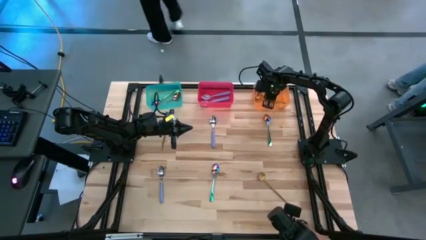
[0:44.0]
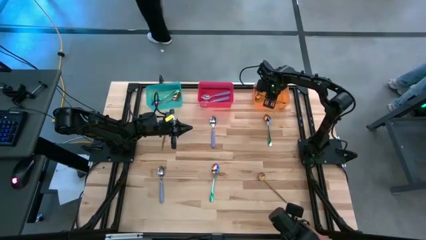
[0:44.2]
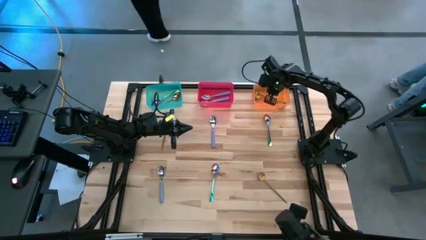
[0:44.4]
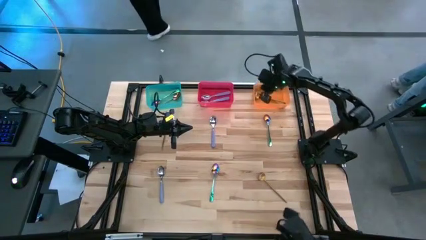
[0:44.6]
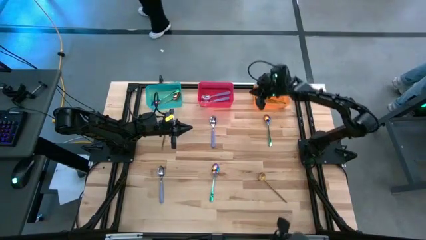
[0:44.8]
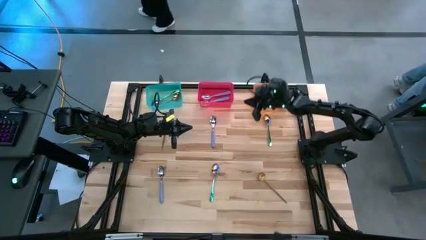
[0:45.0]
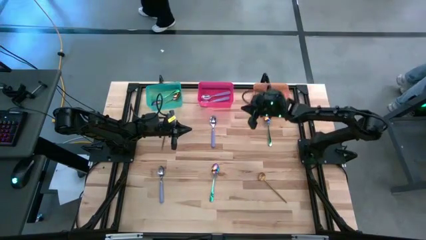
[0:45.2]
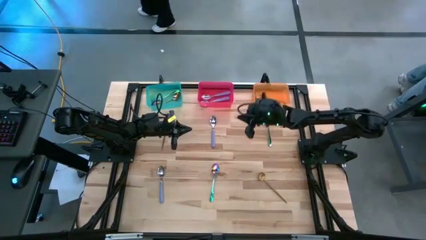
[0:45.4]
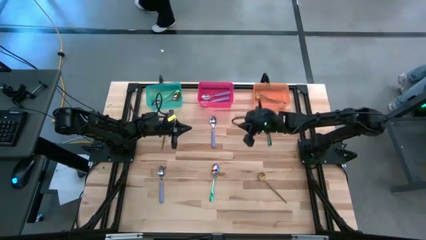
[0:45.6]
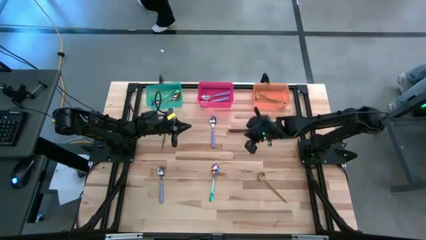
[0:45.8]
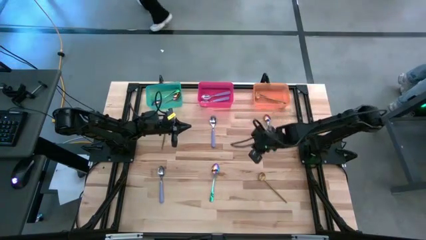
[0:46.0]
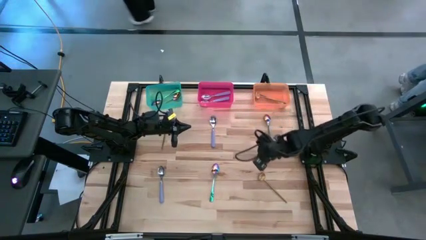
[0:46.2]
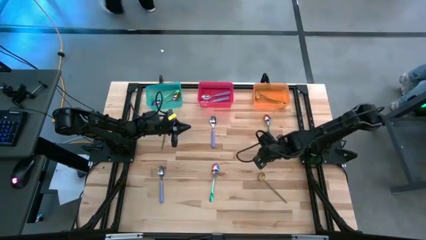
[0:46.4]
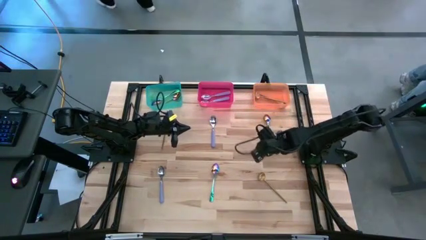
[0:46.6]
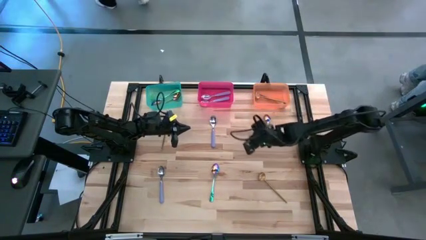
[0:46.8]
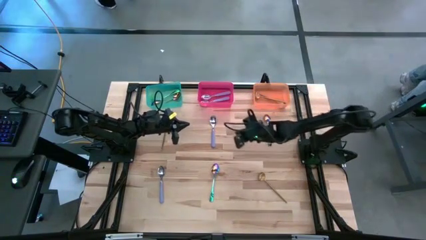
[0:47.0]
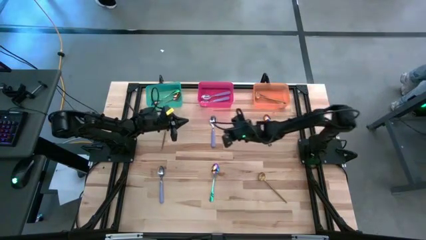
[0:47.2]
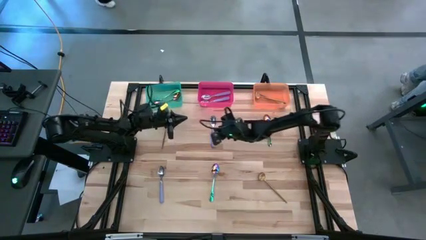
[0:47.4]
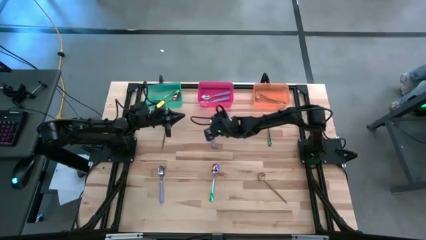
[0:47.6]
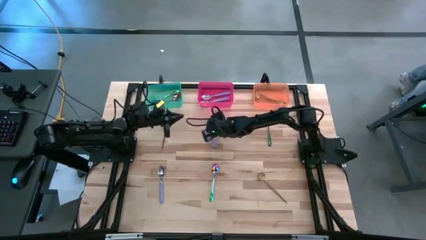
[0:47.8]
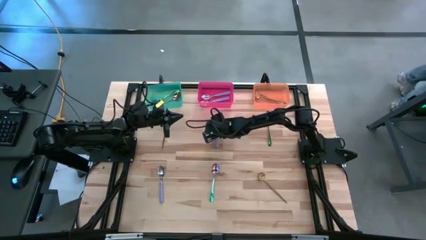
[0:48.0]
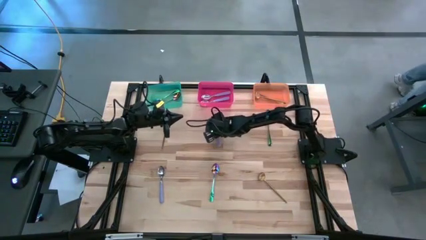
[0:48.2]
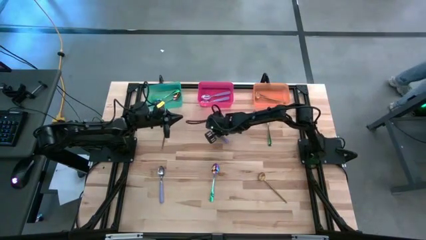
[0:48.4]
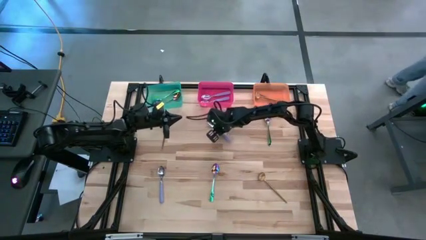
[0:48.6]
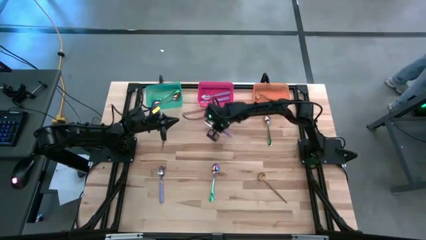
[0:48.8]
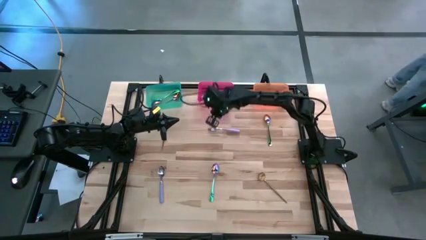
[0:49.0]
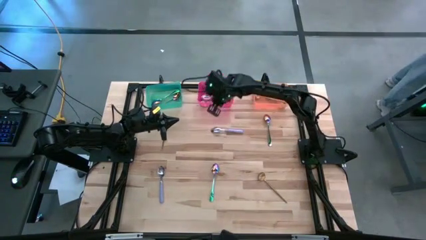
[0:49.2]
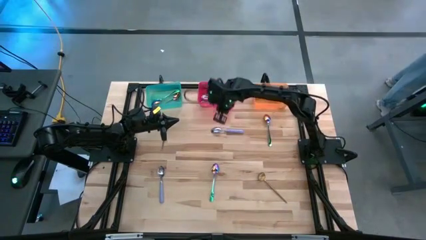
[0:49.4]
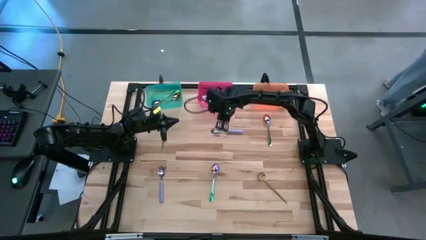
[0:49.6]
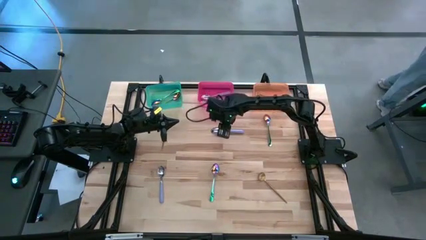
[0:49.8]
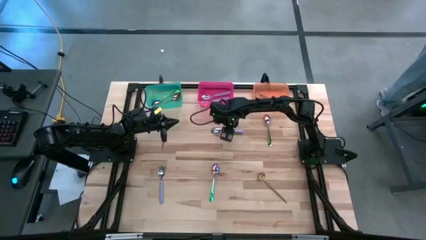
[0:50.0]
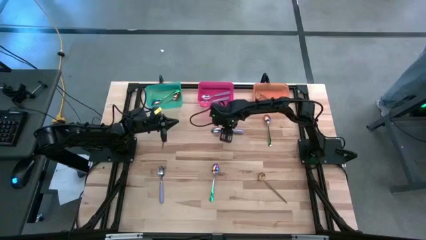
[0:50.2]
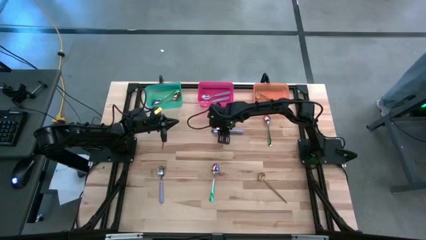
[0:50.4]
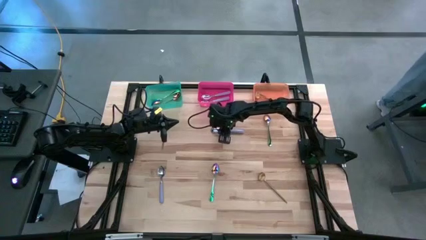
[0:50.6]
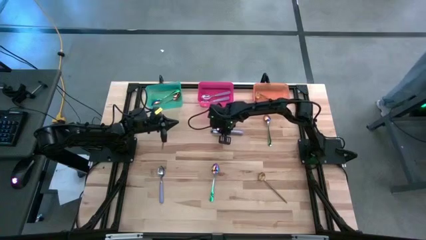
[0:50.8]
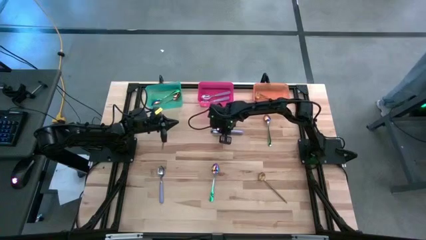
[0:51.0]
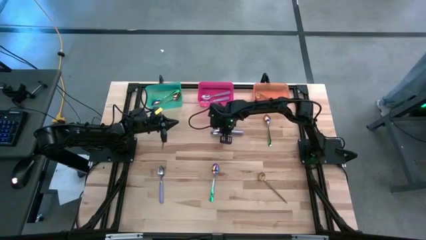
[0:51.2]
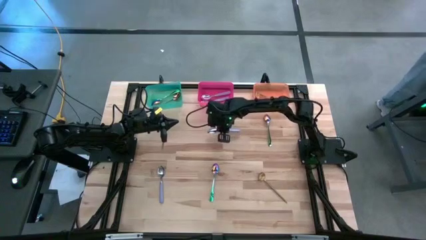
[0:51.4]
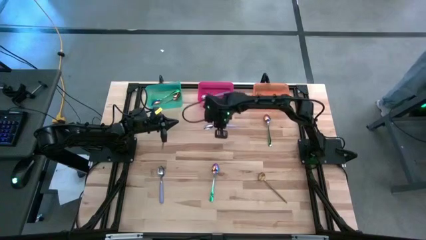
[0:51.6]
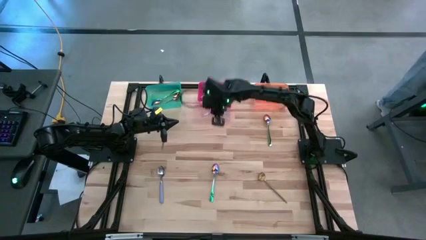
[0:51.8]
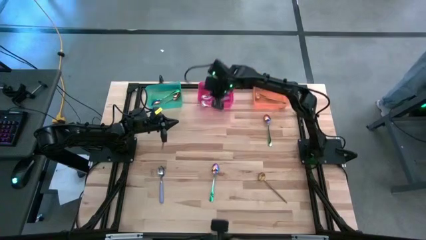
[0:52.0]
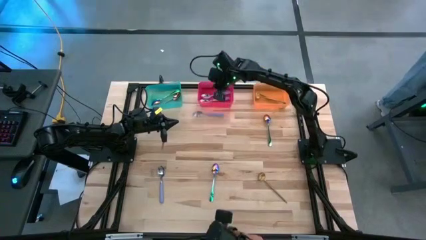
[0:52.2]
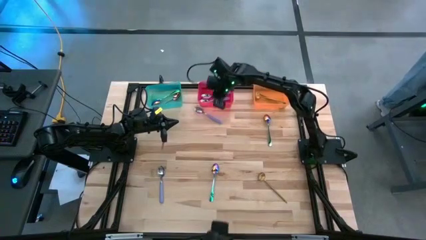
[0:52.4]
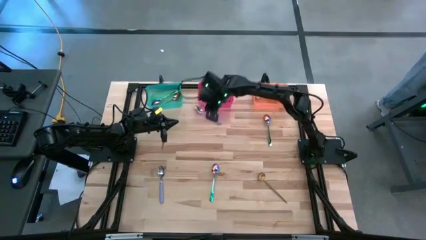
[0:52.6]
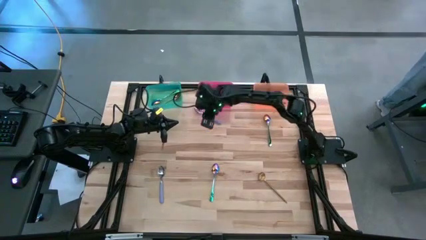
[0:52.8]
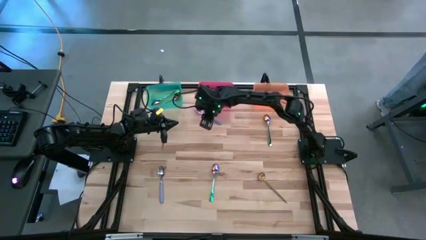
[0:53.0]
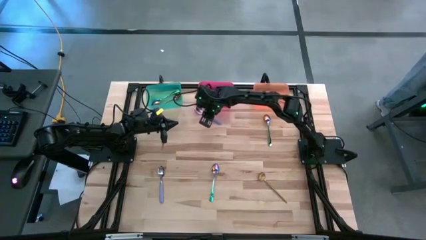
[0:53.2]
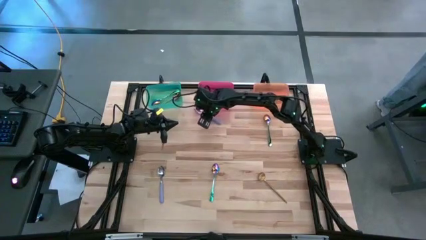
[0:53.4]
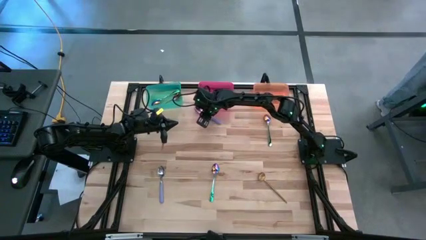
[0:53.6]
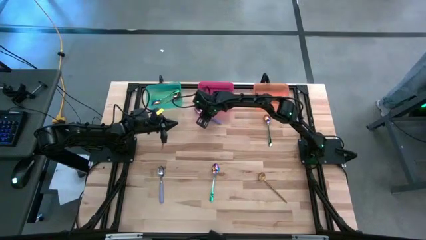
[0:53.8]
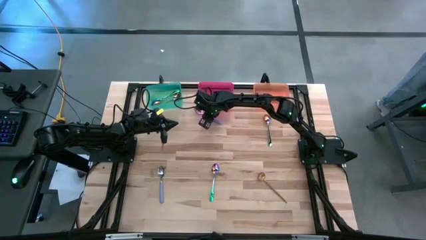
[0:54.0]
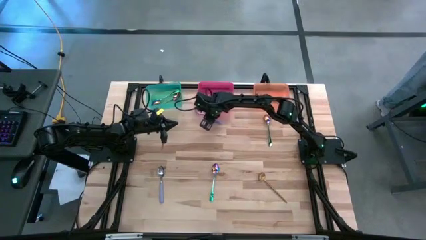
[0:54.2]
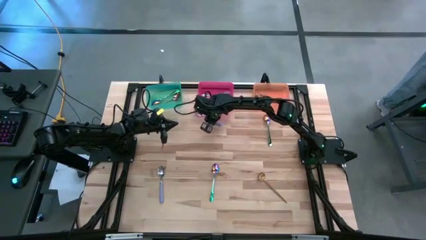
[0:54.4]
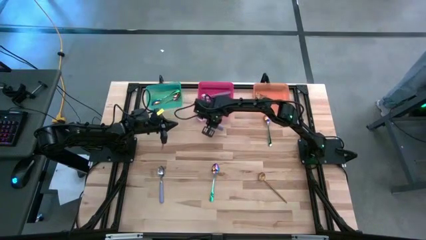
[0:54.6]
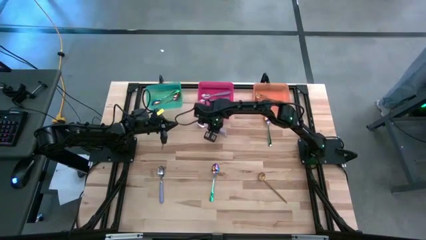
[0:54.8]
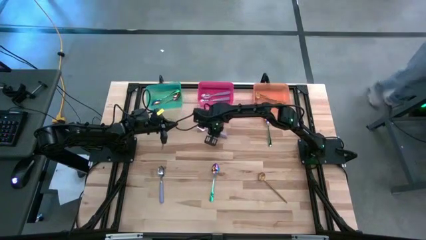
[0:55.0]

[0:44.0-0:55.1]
Task: Sort silverware by color (type)
Put the purple spoon into the red bin

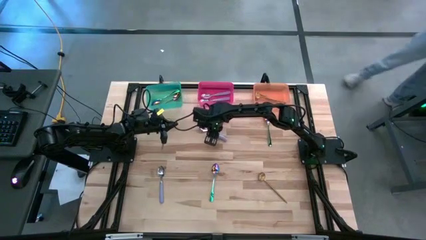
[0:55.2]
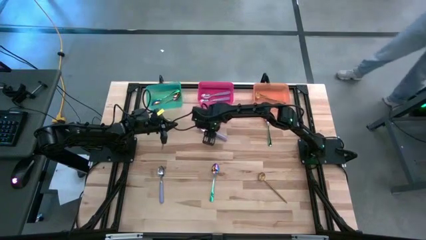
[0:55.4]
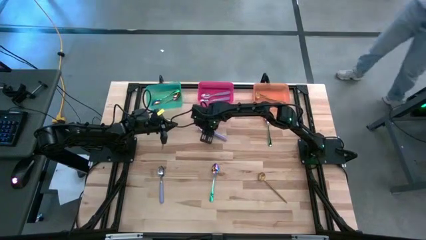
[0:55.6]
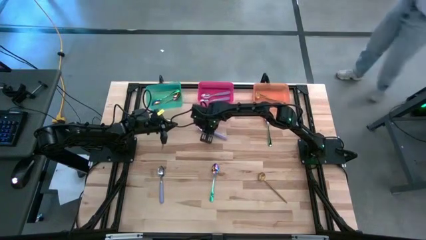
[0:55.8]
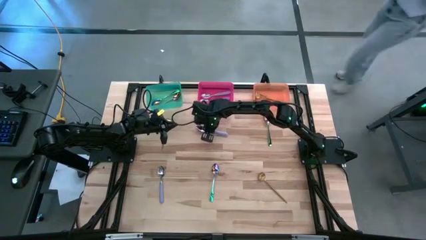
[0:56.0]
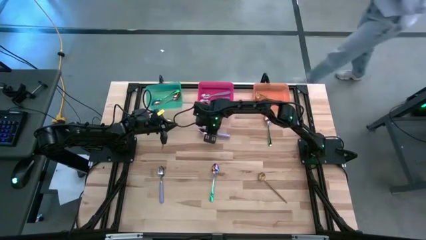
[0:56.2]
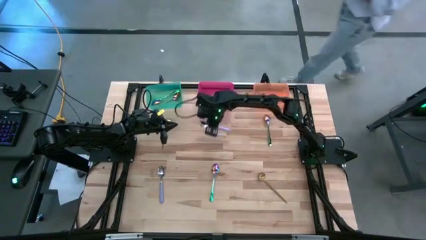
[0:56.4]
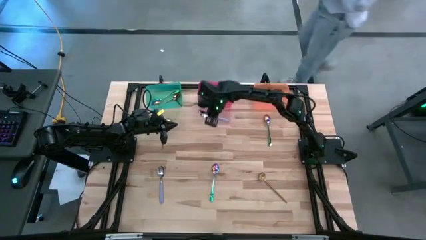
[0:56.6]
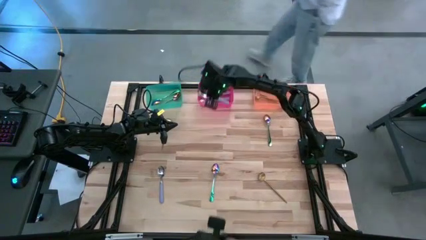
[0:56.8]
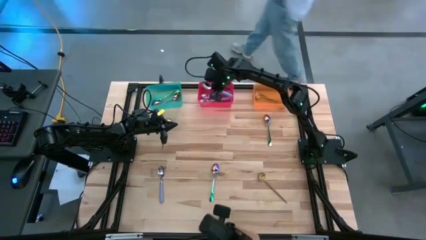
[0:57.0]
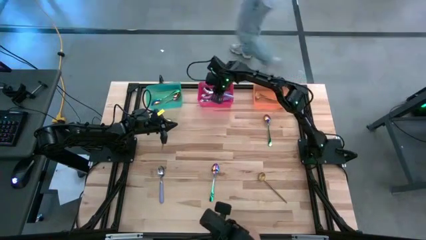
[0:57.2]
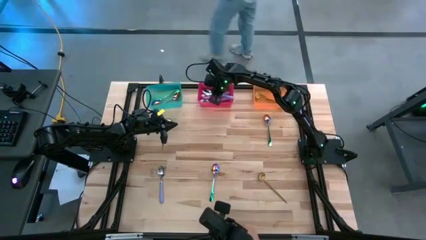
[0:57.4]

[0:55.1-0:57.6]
Put the purple spoon into the red bin

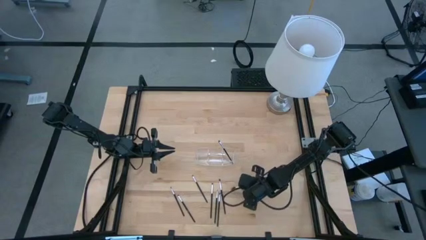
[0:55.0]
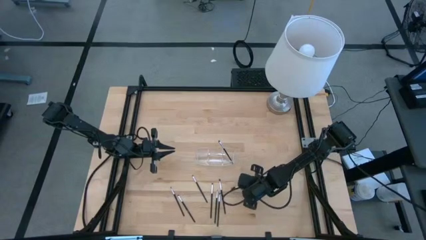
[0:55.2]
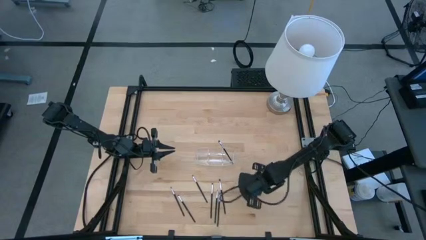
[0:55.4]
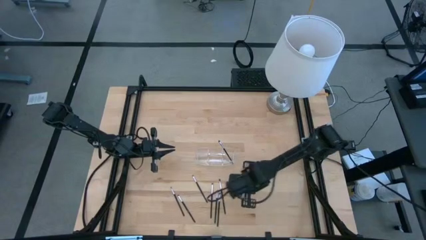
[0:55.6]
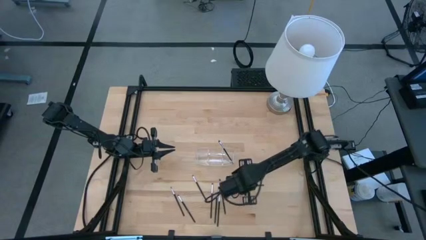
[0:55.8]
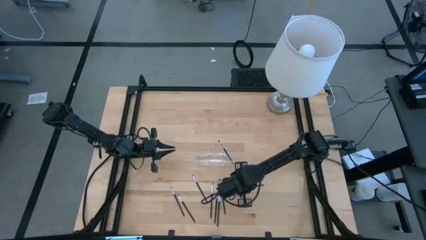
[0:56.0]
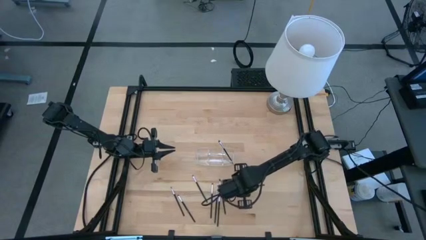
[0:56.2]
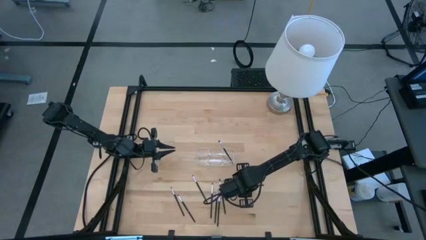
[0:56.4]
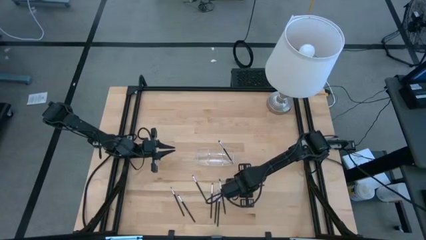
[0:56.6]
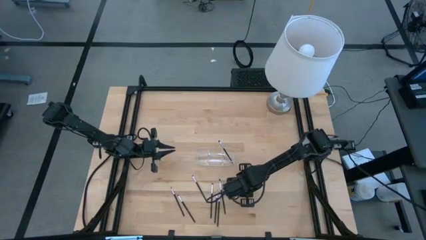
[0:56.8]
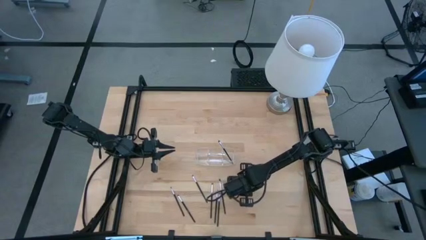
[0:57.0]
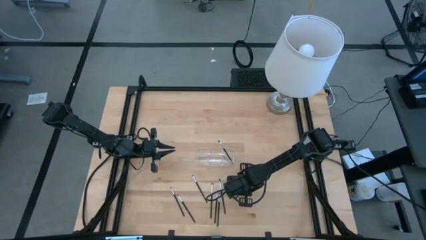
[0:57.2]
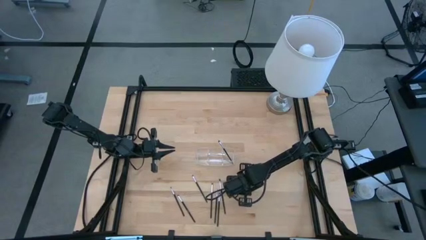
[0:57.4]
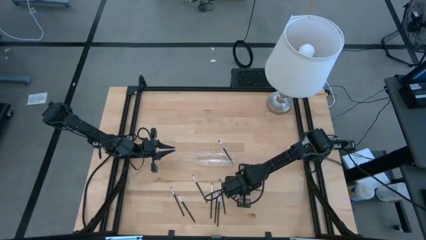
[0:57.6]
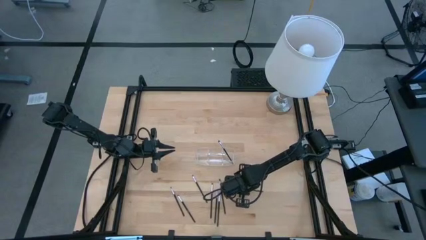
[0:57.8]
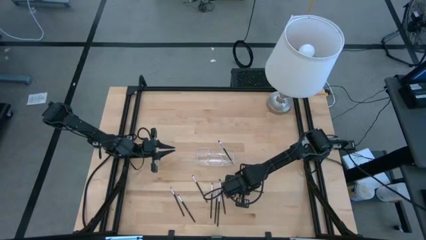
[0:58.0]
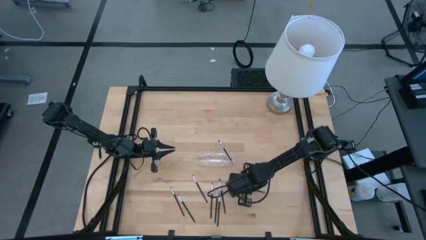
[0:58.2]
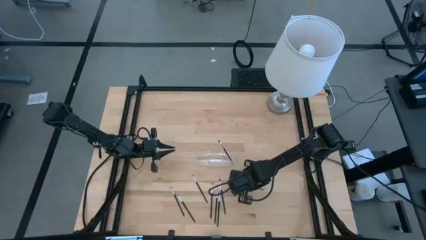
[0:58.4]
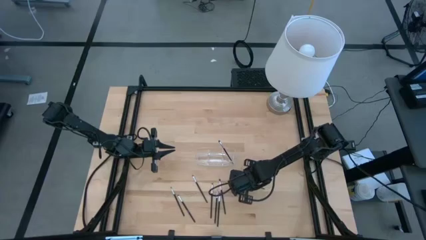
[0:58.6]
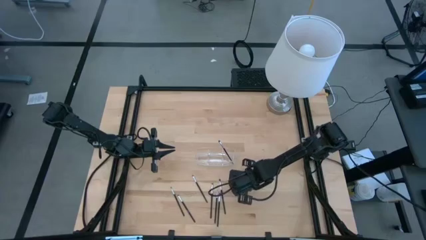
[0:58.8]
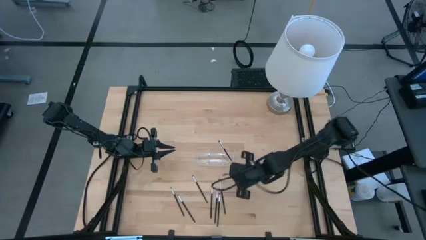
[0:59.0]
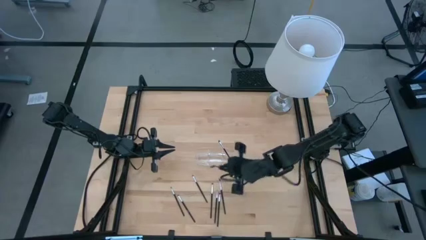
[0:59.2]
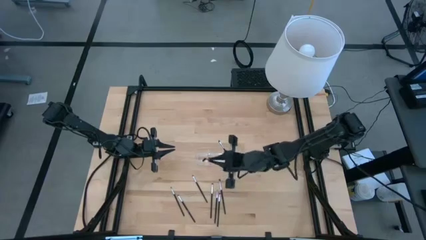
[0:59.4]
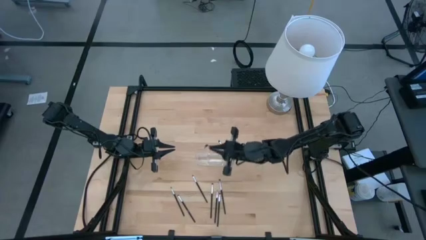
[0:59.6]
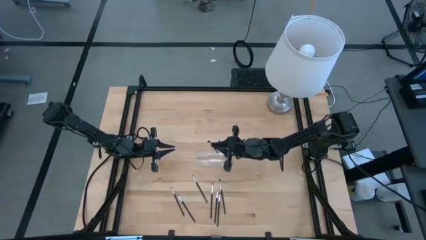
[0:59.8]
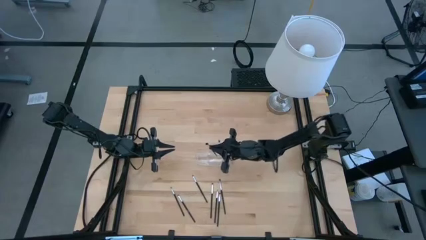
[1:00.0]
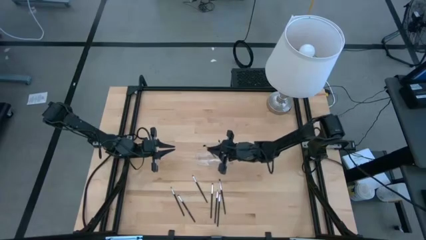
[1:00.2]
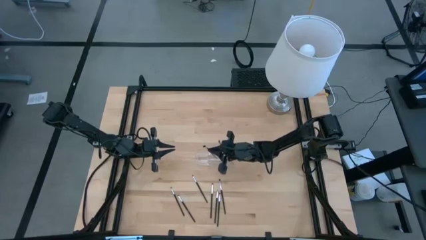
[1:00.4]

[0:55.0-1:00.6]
Task: Pick & Place Makeup Supplies
Put the makeup brush into the transparent organizer
